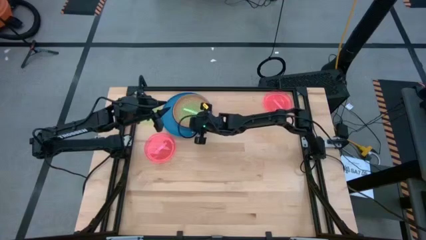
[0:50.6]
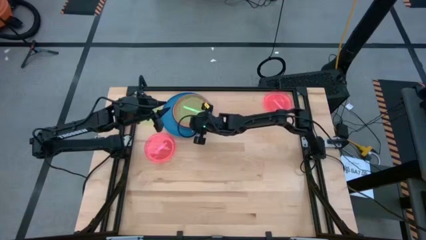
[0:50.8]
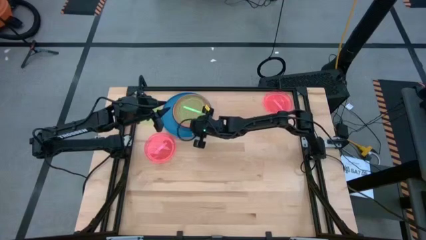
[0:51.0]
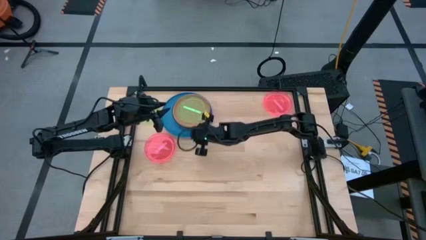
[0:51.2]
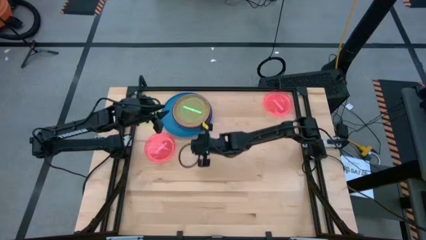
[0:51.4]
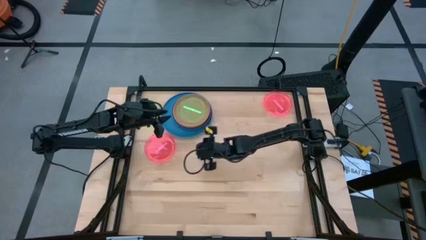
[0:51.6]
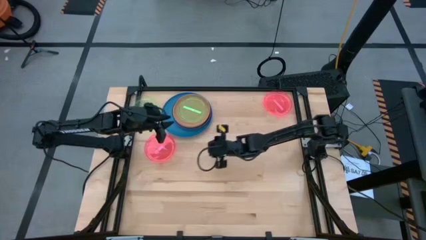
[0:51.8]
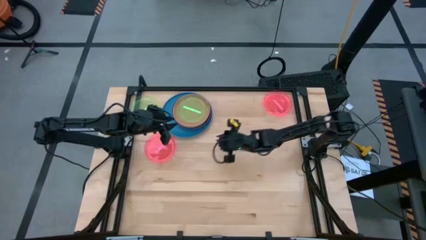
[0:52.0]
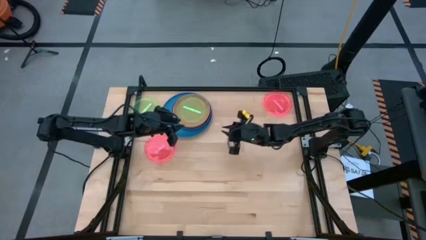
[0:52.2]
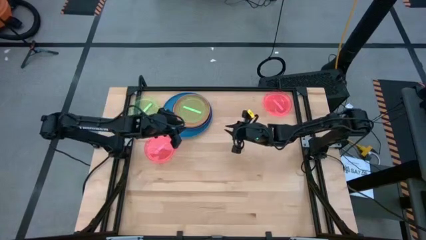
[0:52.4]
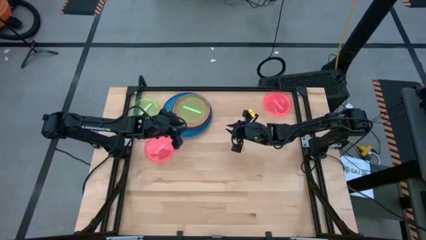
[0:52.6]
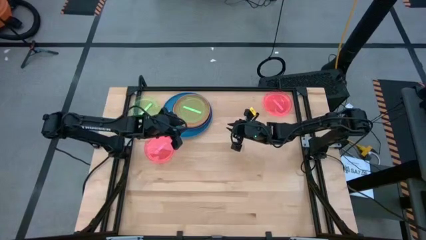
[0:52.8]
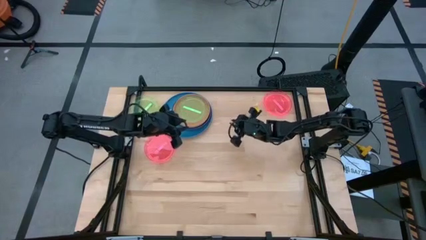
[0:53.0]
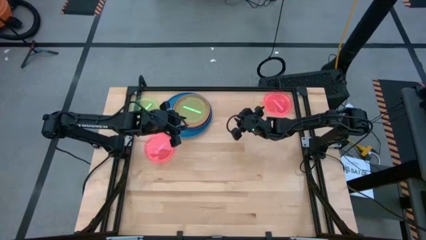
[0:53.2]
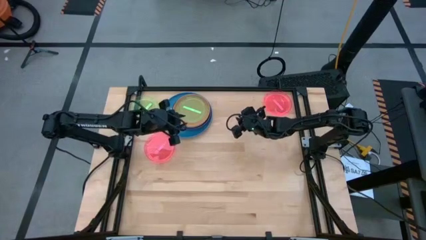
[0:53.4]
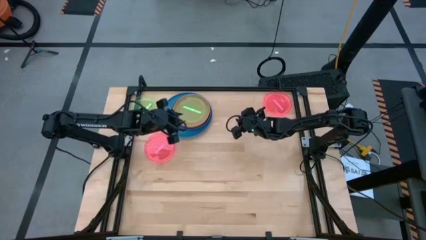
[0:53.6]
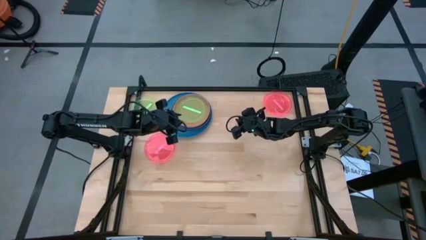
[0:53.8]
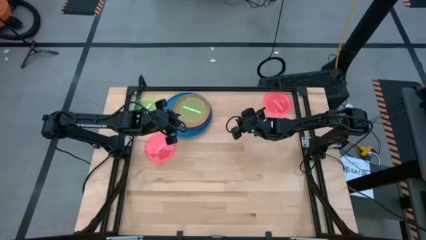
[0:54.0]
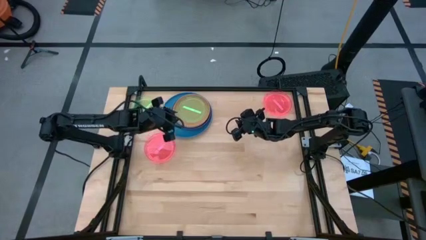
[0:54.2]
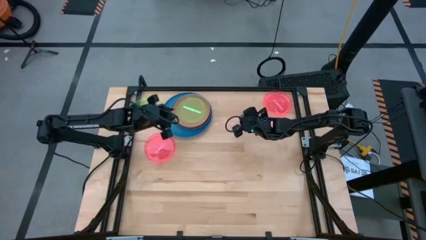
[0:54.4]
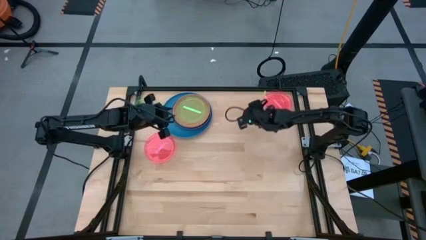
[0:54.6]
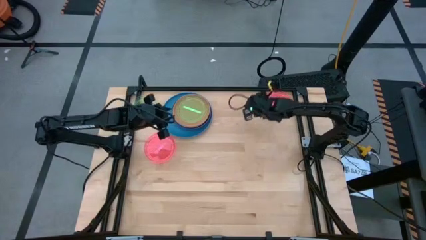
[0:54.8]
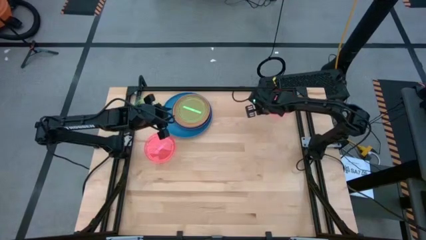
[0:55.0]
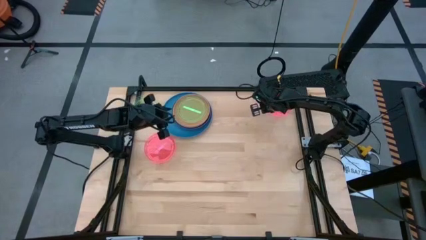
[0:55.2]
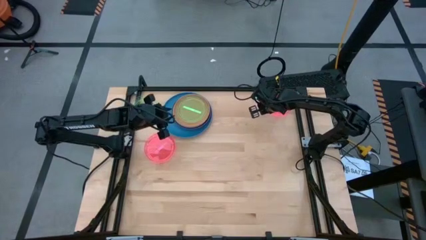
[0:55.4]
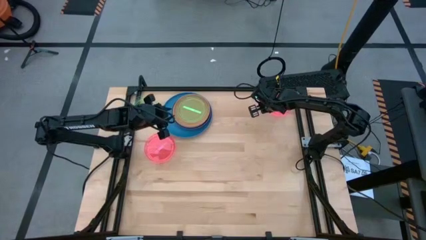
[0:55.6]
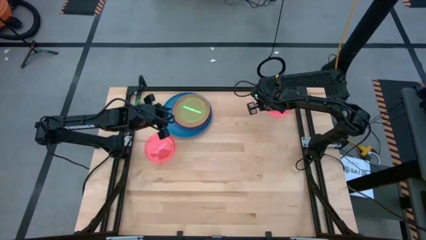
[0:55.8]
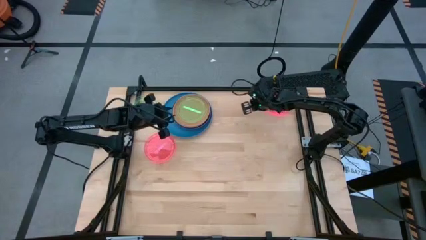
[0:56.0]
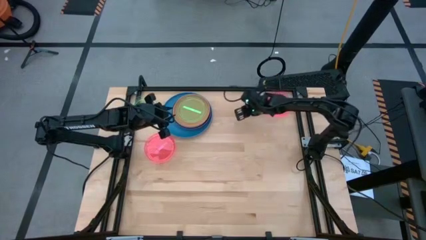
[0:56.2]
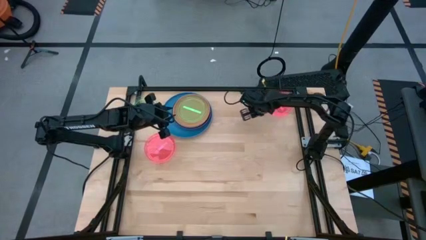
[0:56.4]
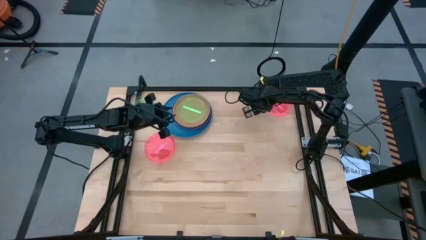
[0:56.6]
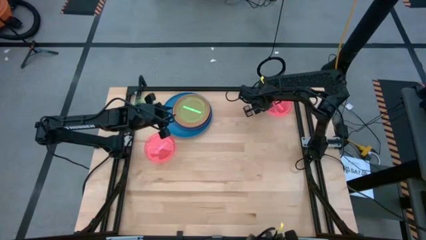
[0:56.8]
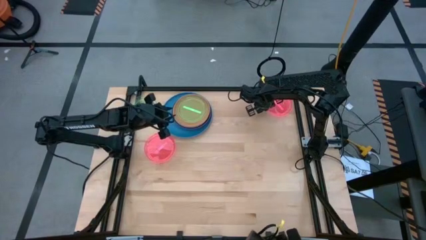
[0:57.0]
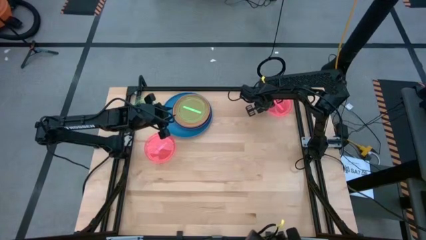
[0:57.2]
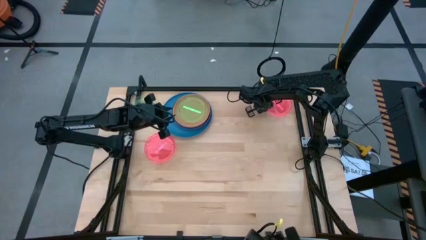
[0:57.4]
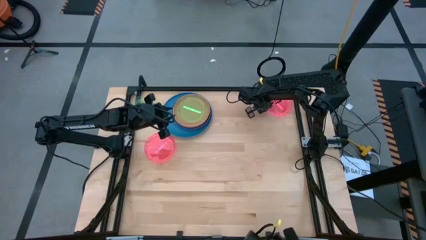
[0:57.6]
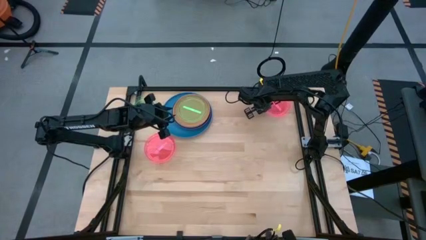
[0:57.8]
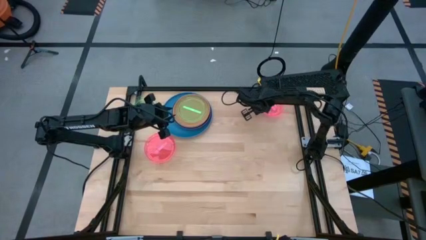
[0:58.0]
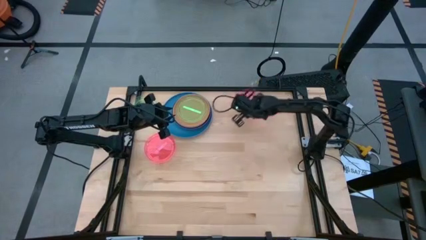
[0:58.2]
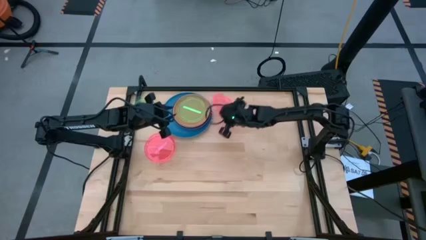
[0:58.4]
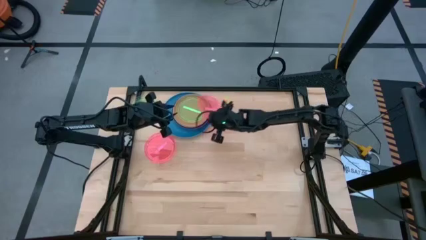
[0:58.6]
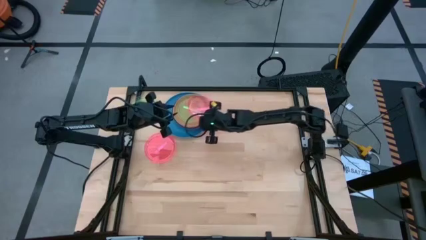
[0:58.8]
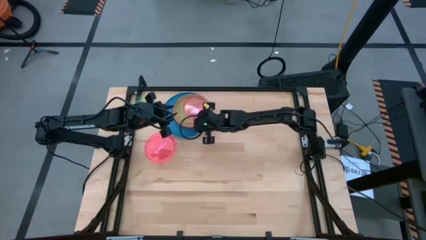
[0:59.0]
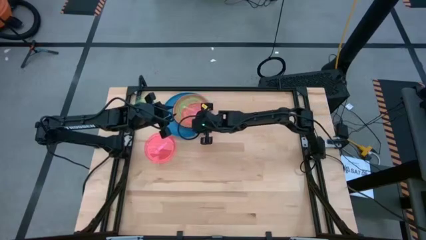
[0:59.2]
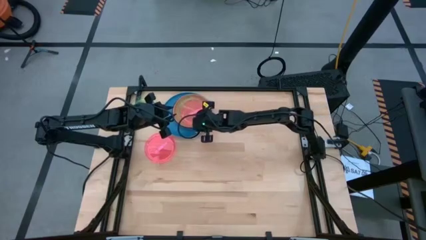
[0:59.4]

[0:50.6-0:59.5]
Task: Stack plastic plates
Stack the top pink plate on the green plate

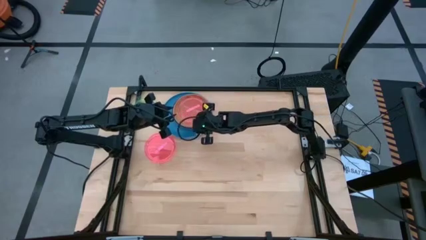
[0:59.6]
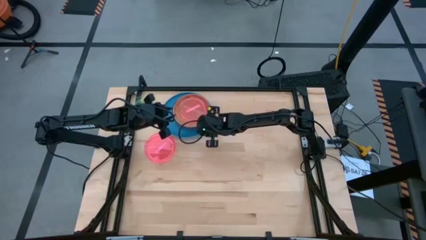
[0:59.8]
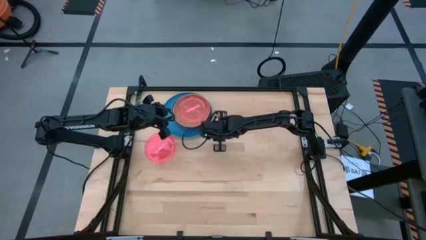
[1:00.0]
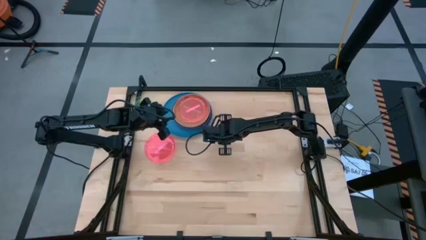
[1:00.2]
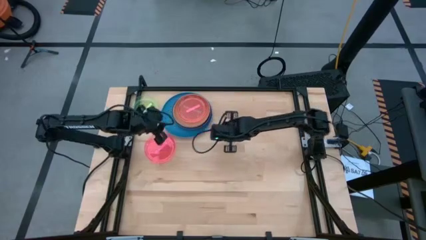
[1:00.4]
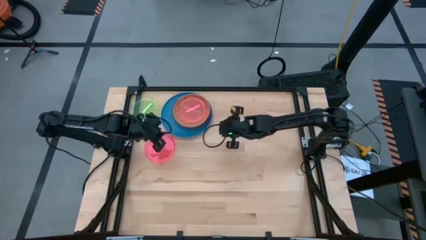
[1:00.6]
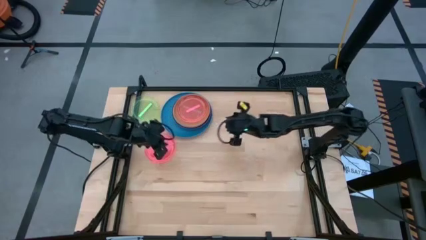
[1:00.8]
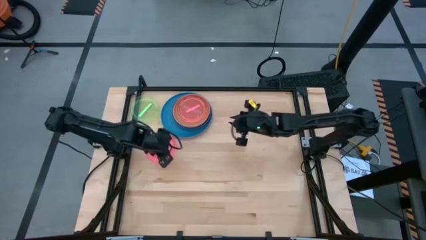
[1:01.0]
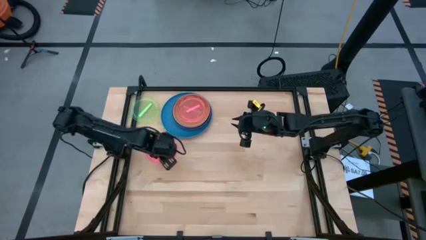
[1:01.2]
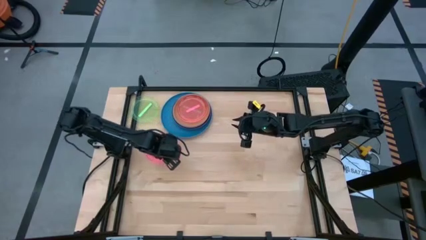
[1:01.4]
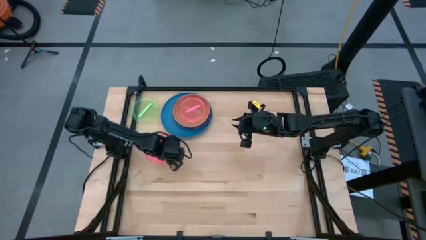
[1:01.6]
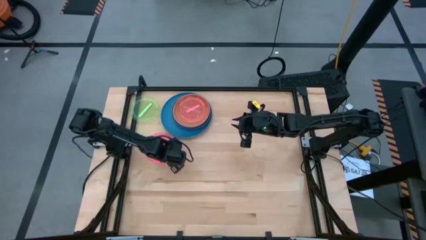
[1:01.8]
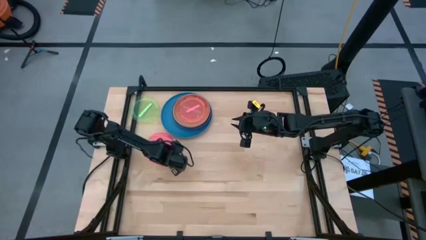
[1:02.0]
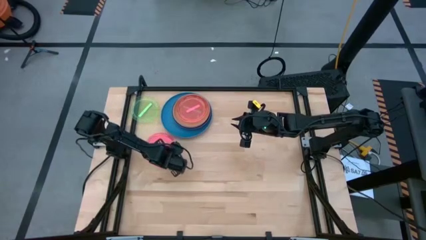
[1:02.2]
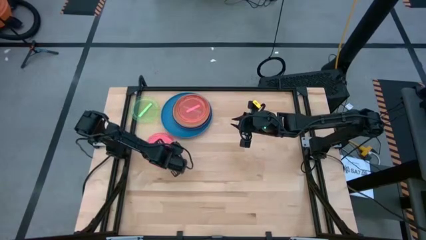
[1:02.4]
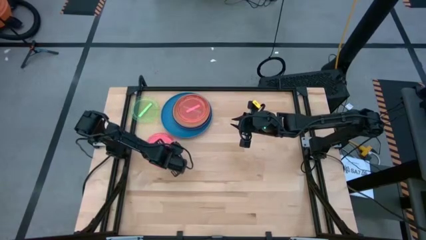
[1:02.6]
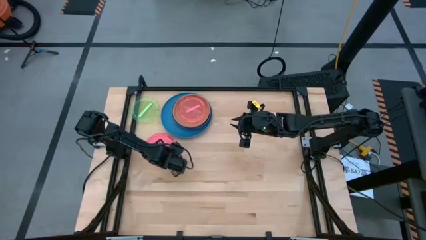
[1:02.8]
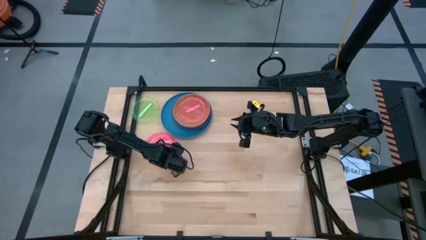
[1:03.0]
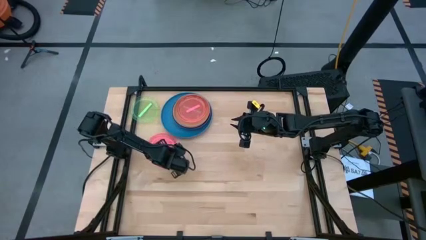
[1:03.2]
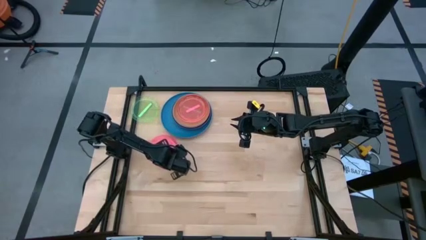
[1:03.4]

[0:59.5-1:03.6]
Stack the pink plate on the pink plate

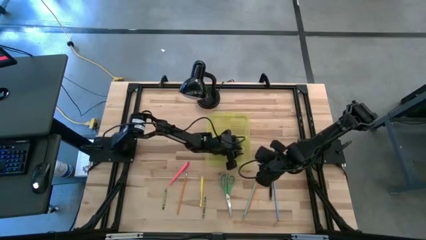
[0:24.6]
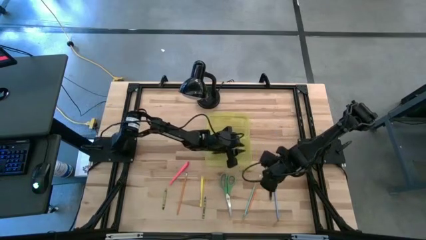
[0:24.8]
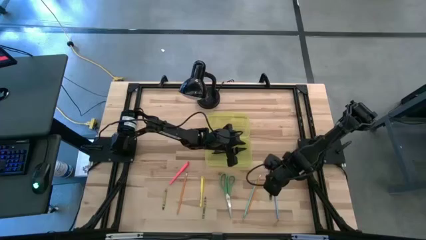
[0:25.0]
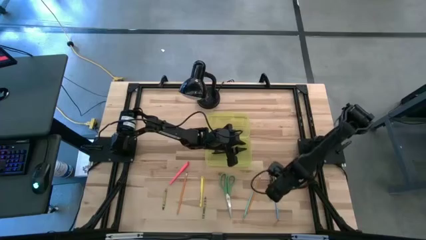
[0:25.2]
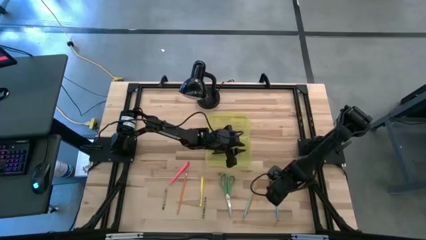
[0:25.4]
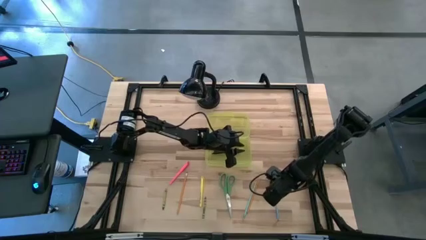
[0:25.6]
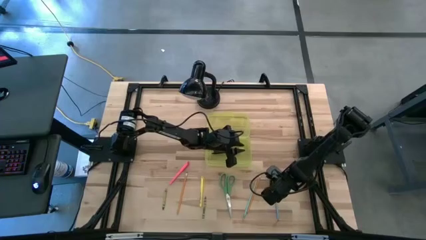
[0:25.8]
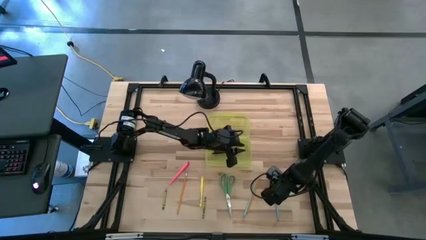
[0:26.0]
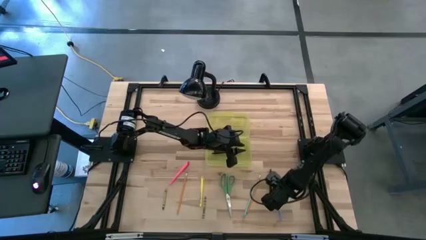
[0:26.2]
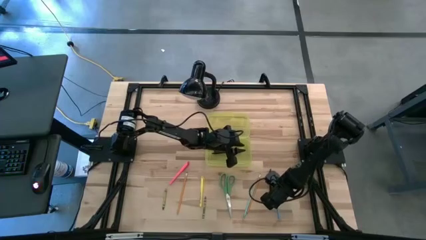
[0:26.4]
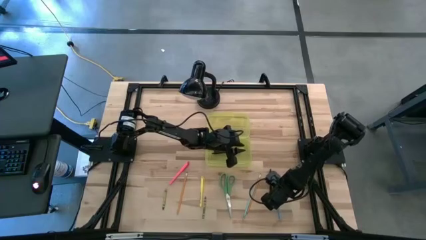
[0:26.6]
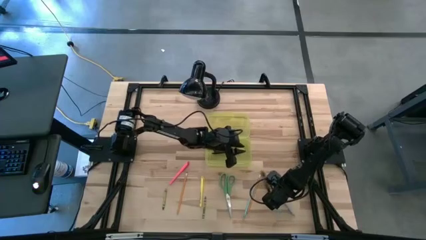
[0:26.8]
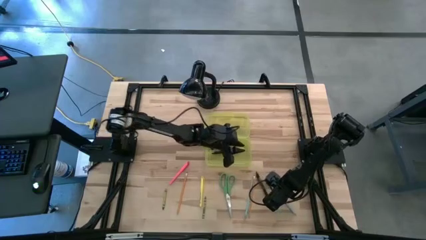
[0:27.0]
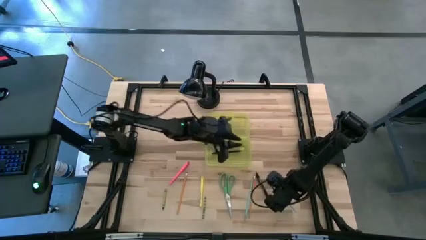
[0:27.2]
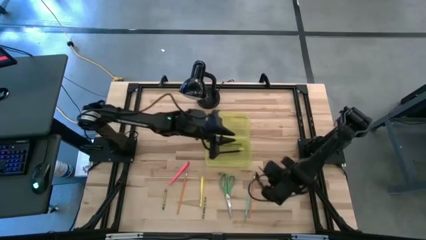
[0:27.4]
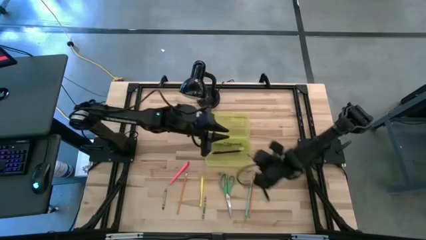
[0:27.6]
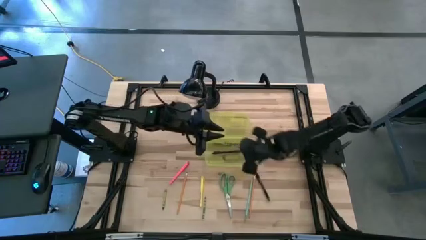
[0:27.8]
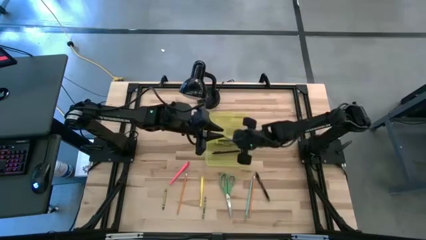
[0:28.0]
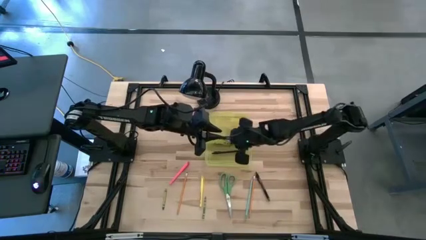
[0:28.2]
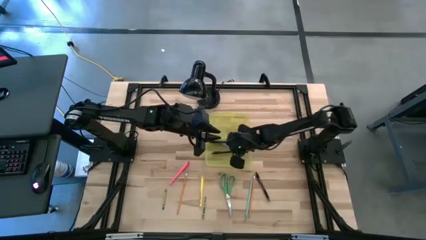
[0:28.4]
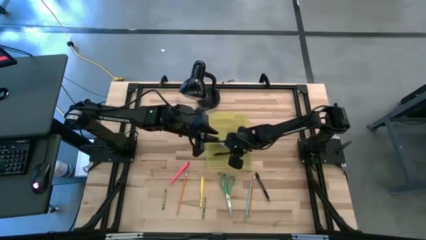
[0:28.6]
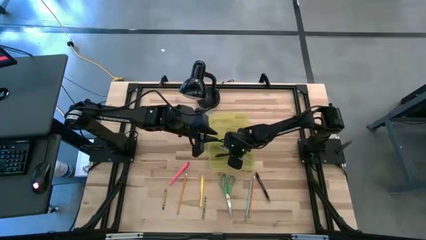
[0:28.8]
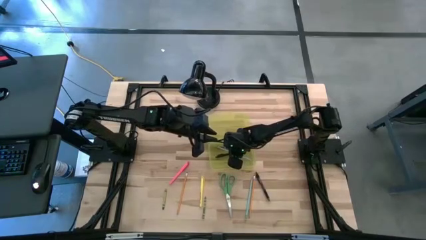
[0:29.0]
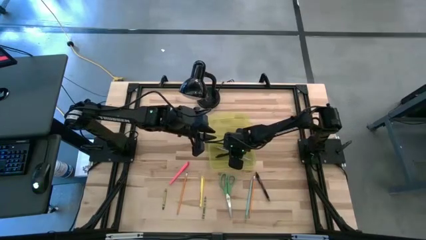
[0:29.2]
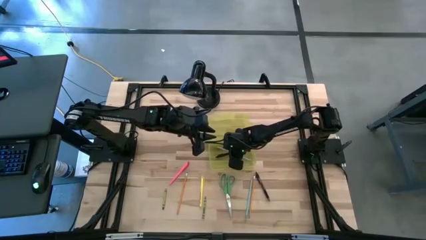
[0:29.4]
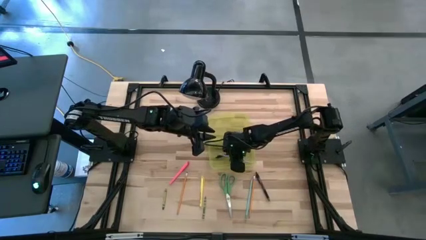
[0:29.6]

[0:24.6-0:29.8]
Task: Pick & place school supplies into a supply box
Put the blue pencil into the yellow supply box
